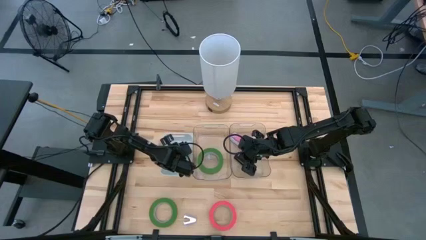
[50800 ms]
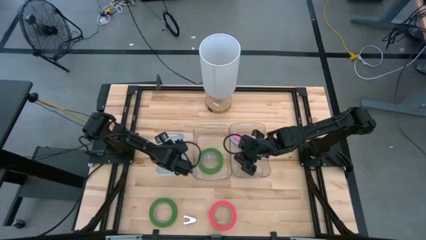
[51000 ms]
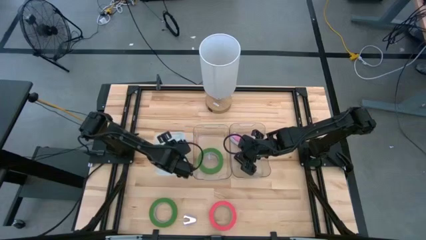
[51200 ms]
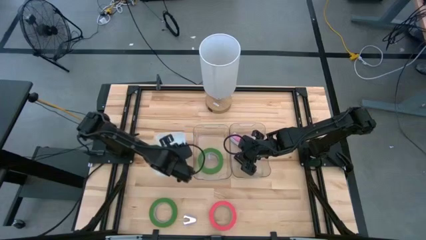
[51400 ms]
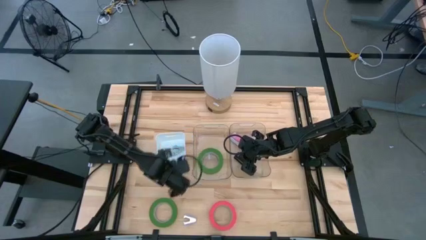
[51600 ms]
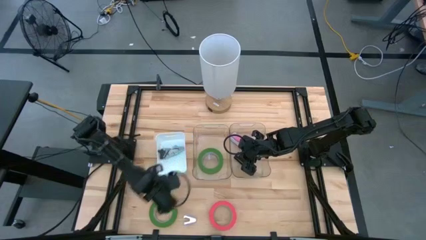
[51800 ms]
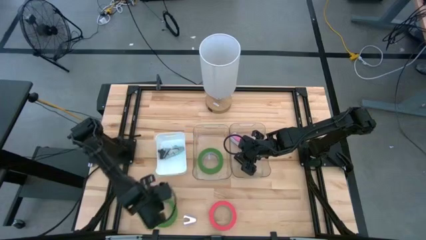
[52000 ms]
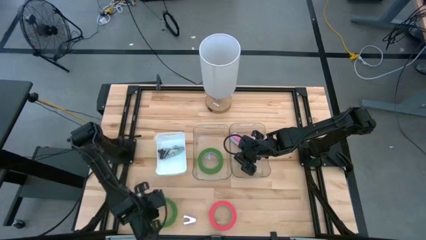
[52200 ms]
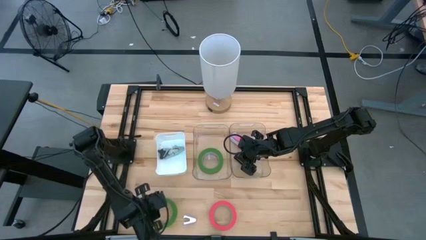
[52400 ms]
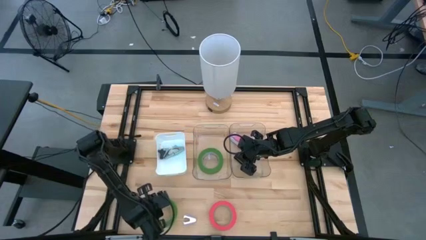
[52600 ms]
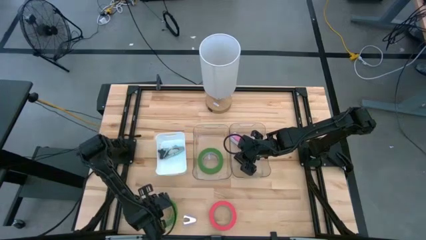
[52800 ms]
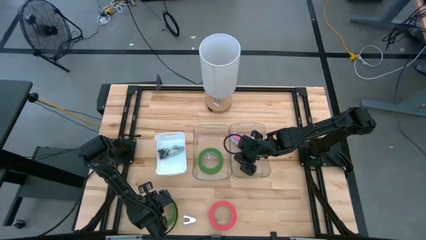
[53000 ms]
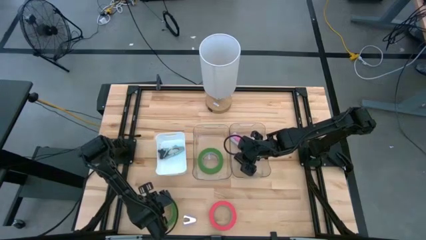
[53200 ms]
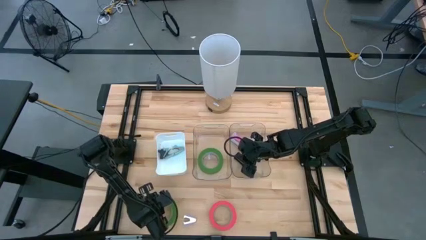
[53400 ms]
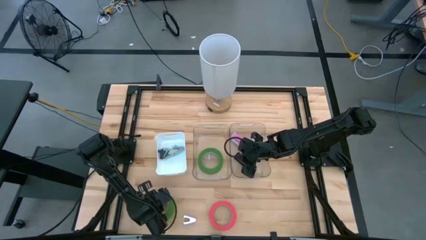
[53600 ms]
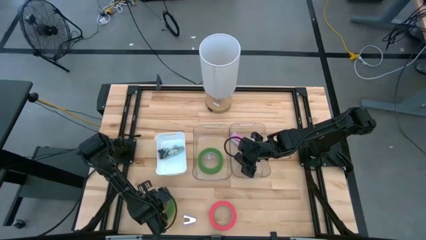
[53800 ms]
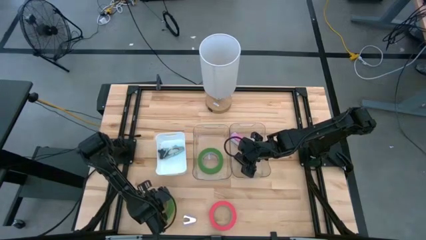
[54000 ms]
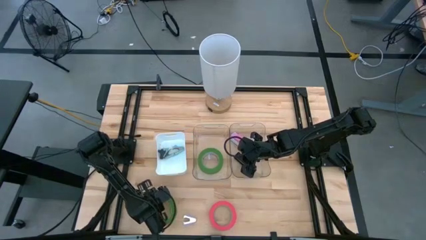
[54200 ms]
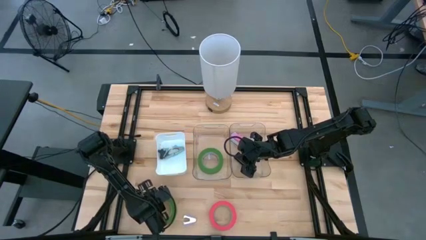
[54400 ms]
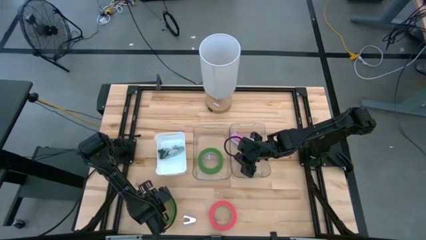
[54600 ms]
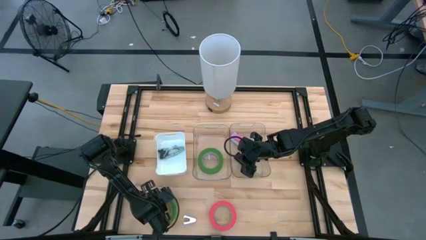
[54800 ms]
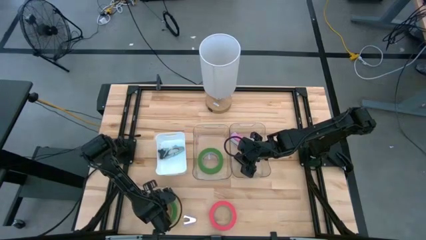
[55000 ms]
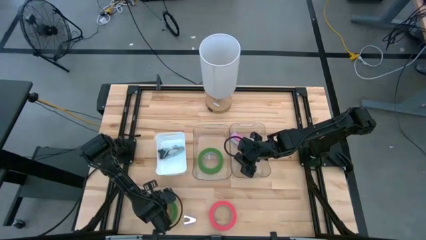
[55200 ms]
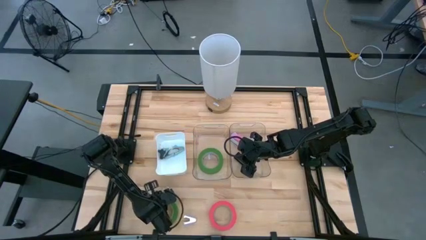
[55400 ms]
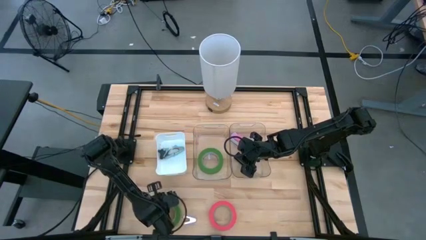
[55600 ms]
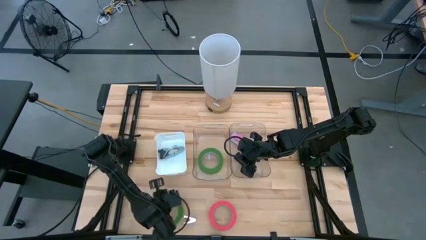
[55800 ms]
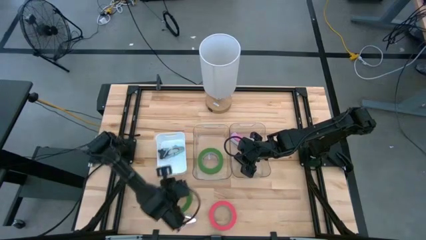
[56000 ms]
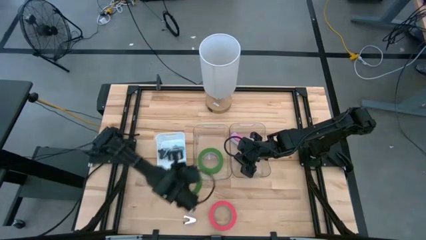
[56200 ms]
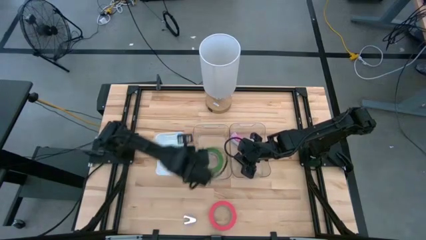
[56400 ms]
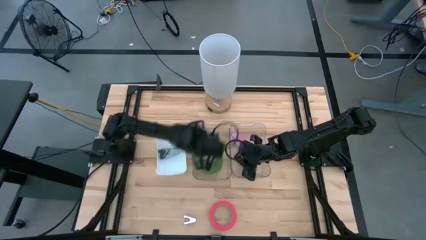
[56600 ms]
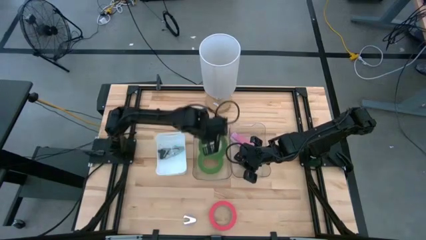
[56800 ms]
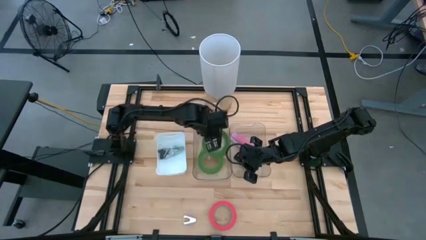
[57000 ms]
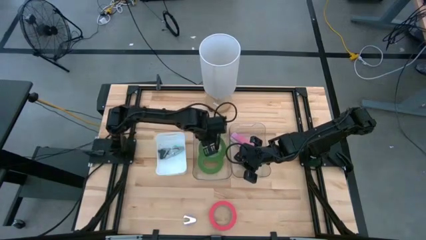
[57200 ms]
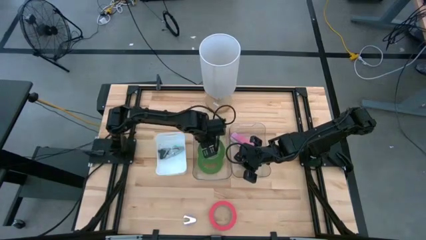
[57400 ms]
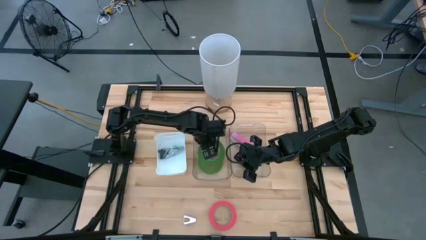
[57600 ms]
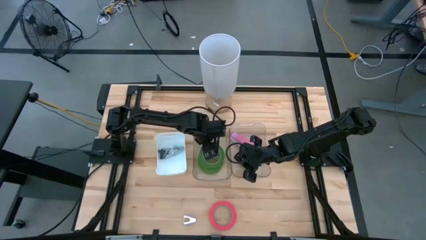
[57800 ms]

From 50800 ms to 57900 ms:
Task: Pick and place Stapler, Stapler remover, tape
Put the green tape into the left transparent bin

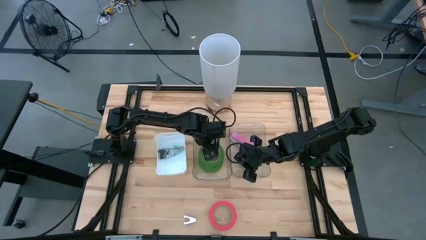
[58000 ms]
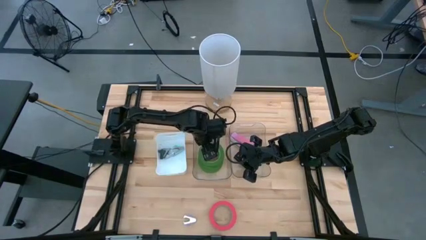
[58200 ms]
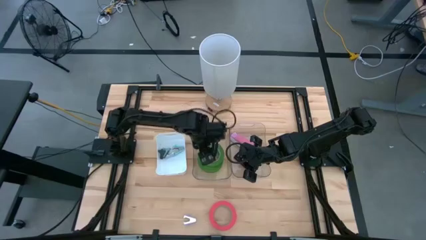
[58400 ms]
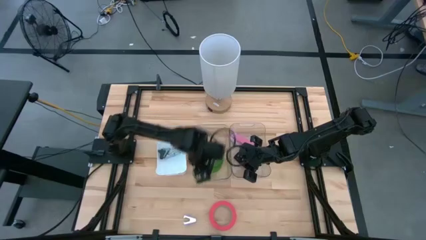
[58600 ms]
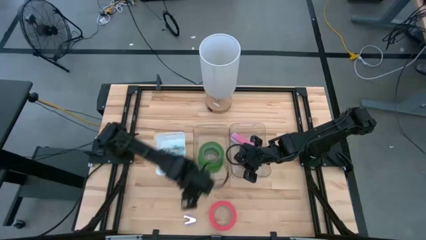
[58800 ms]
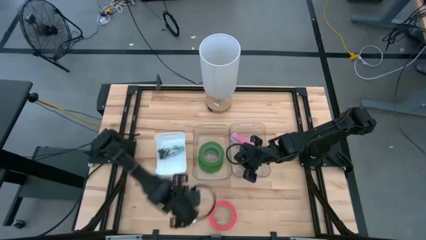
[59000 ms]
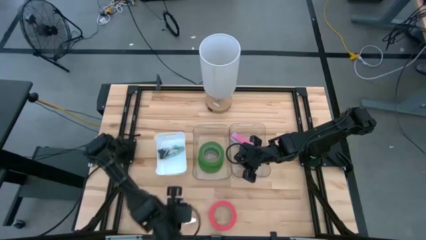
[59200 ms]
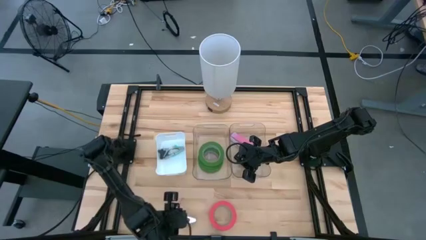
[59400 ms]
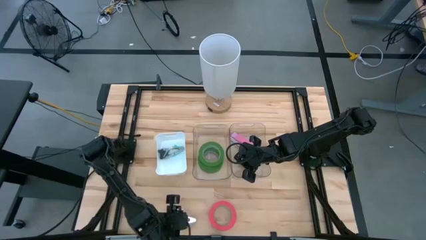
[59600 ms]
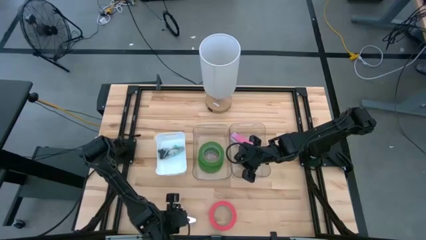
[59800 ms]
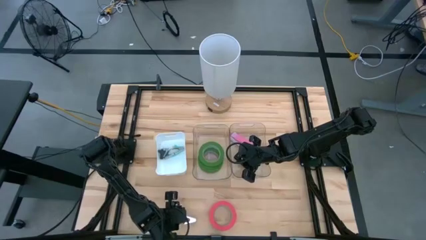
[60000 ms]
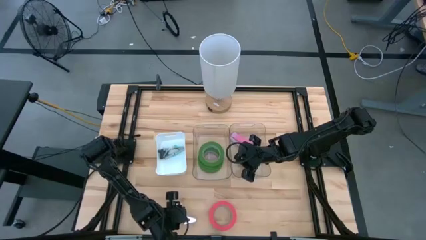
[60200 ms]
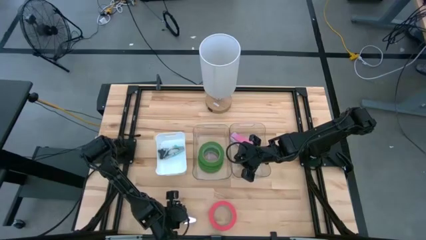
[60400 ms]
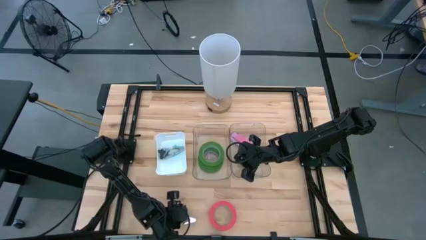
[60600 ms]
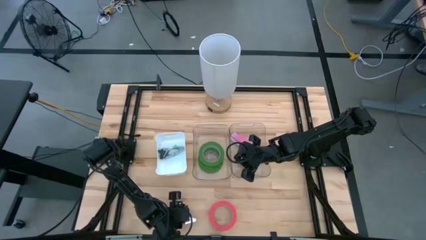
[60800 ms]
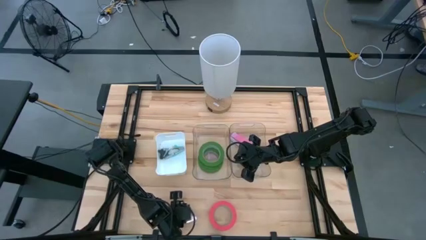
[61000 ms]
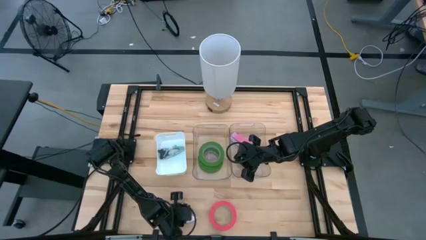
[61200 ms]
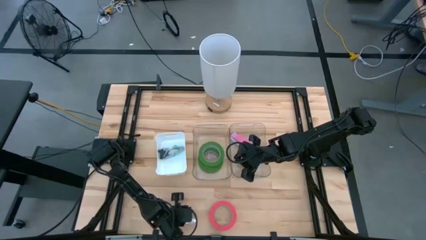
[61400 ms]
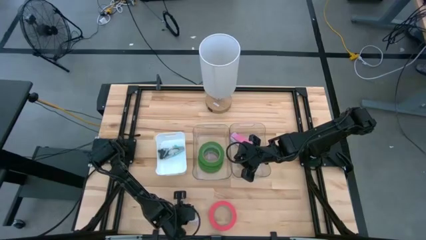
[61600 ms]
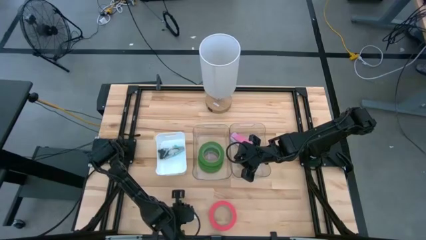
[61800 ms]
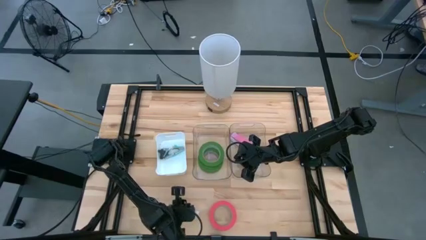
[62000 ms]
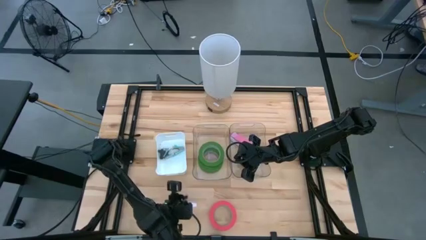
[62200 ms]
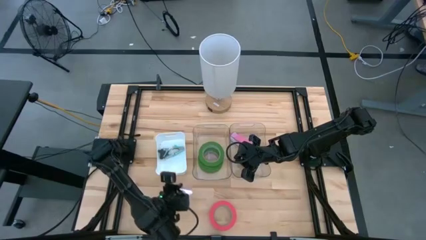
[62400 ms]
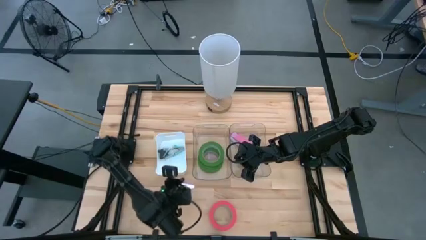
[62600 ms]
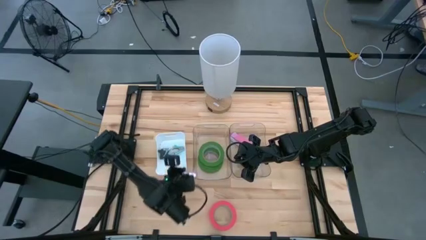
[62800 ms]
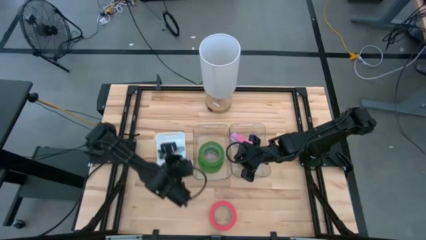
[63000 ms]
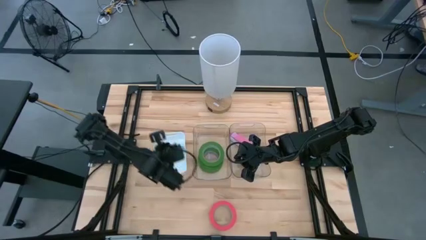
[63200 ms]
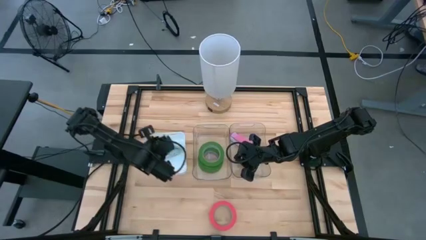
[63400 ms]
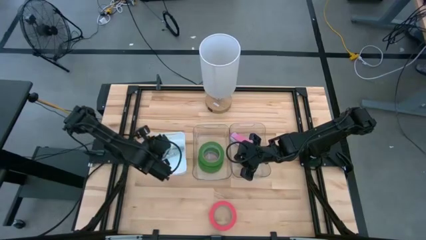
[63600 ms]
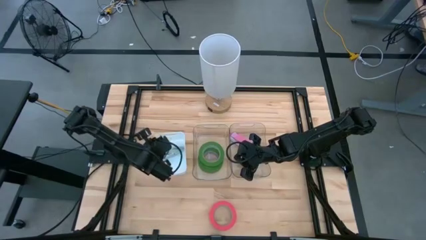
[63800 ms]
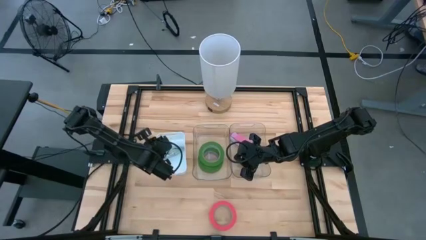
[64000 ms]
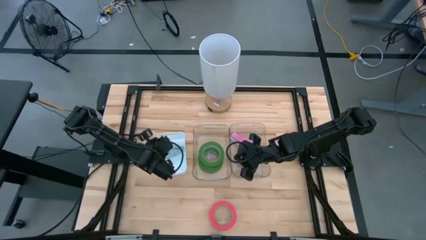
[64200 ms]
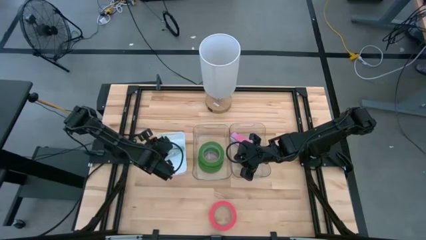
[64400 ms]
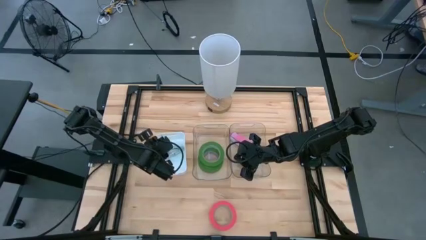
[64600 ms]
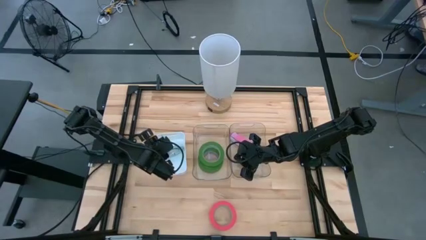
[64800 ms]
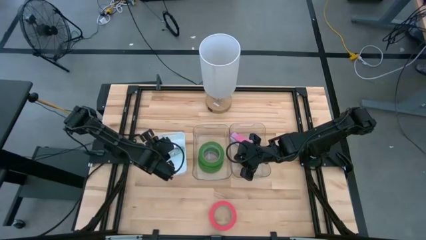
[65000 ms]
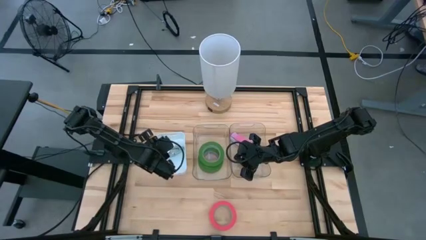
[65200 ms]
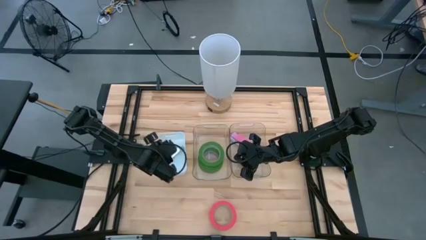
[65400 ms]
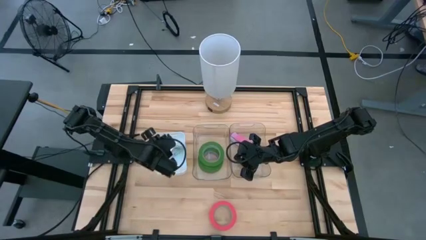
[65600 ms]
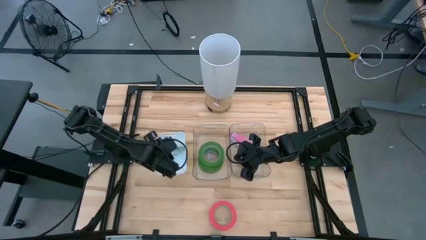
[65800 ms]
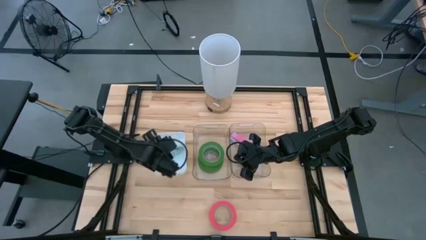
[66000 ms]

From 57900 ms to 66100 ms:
Put the purple staple remover into the white bin

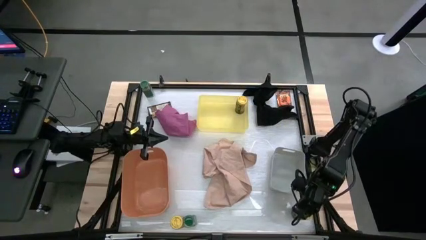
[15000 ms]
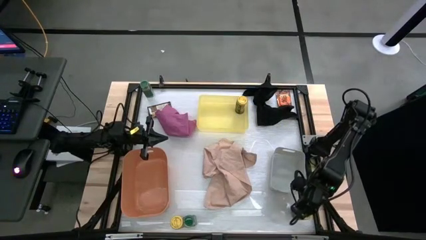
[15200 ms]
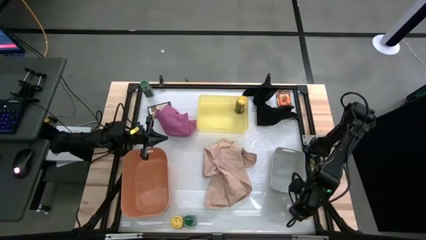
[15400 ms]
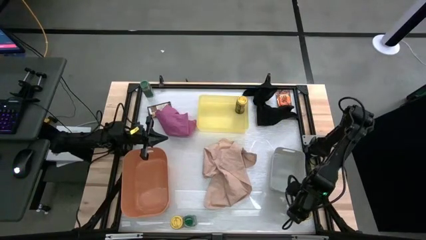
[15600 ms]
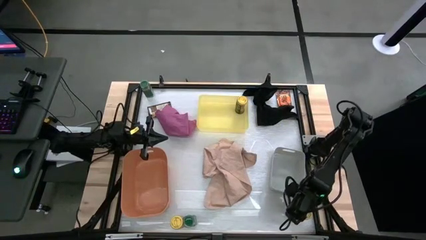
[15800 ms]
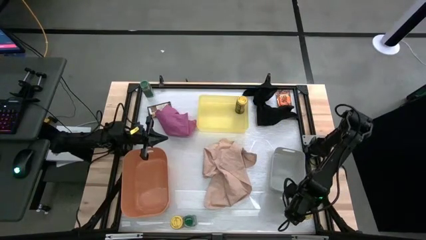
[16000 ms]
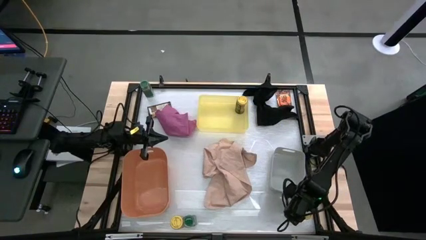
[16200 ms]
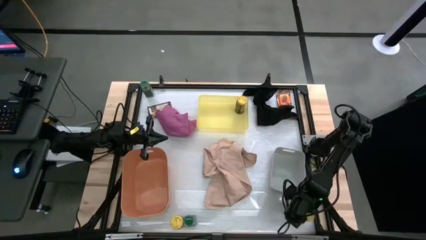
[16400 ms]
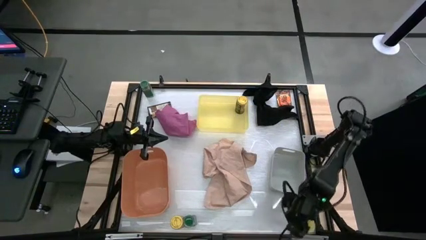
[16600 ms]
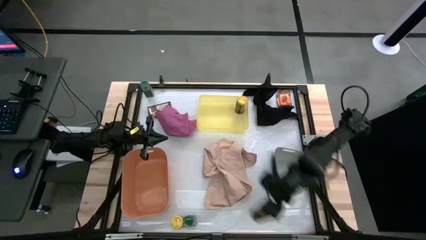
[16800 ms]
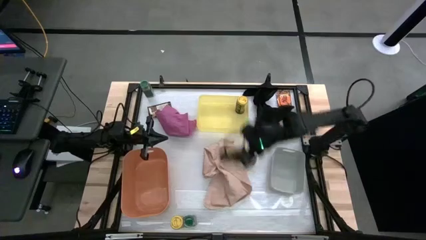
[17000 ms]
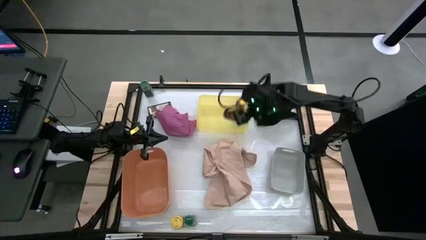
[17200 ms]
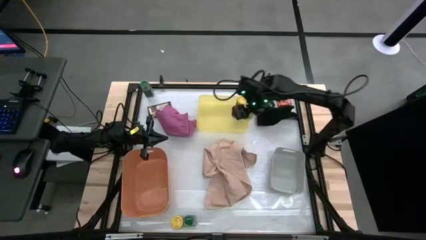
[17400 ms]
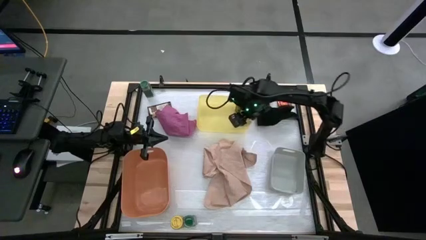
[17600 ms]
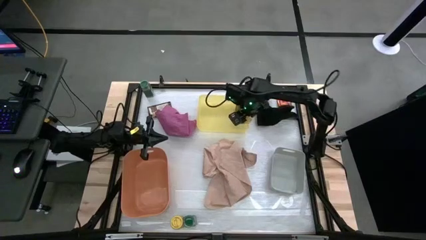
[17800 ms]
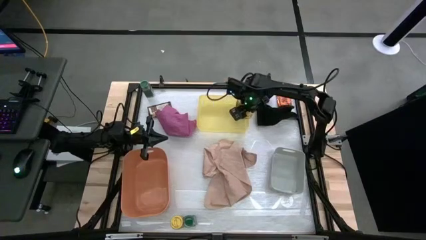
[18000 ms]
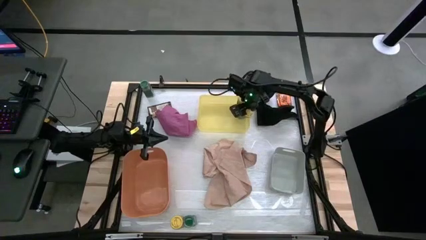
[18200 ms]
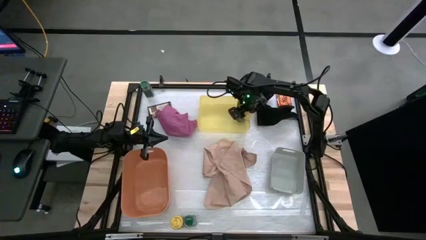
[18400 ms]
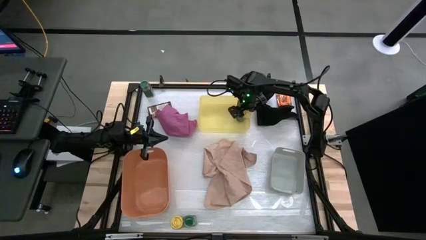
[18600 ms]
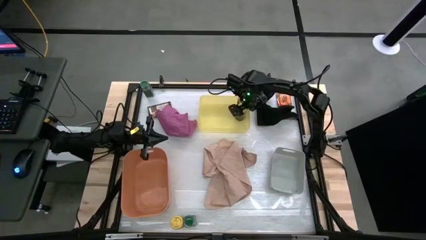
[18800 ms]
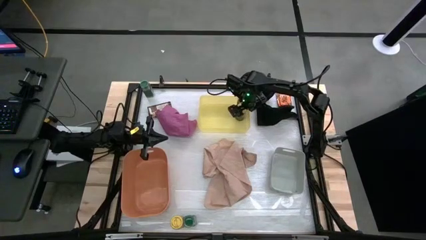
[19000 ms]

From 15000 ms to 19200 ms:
Task: Sort spices by type
Put the right yellow seasoning bottle into the yellow bin
